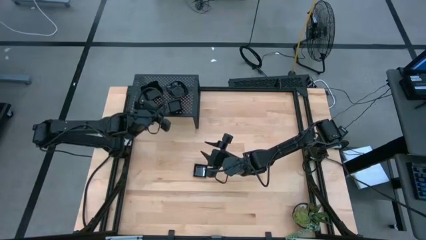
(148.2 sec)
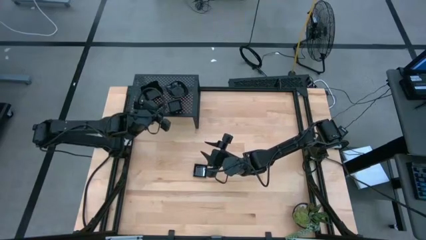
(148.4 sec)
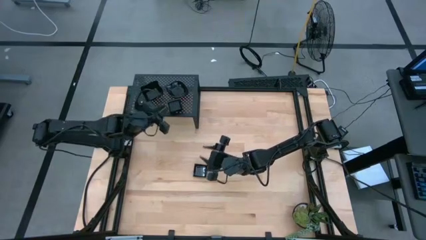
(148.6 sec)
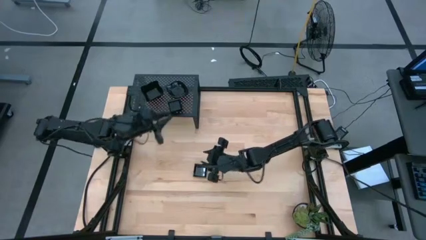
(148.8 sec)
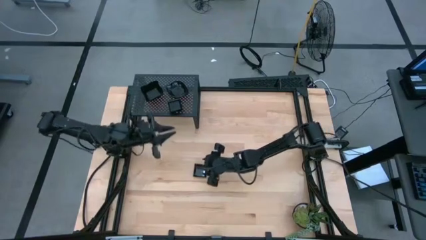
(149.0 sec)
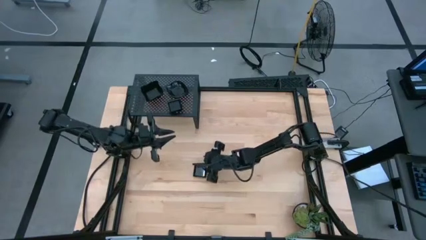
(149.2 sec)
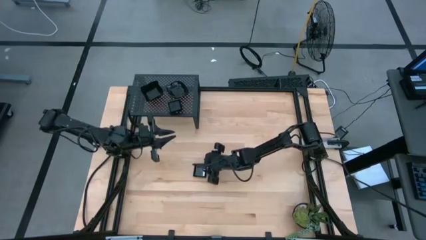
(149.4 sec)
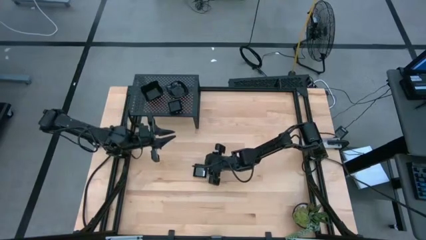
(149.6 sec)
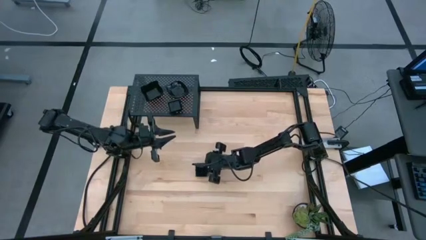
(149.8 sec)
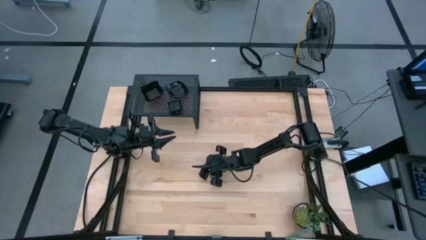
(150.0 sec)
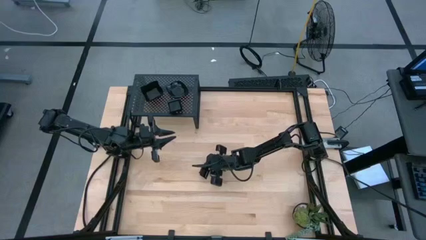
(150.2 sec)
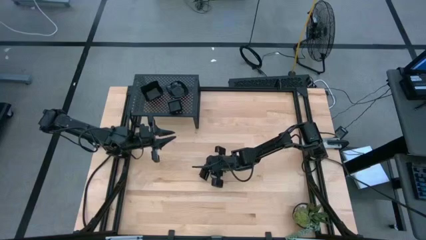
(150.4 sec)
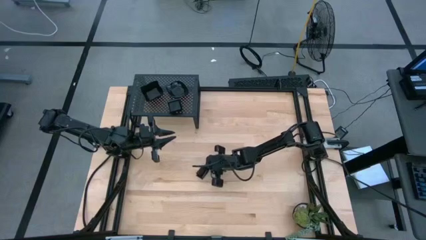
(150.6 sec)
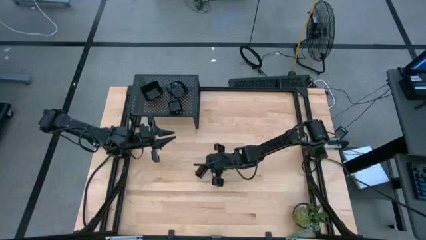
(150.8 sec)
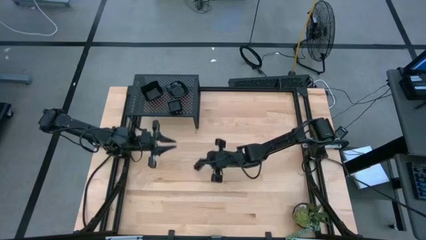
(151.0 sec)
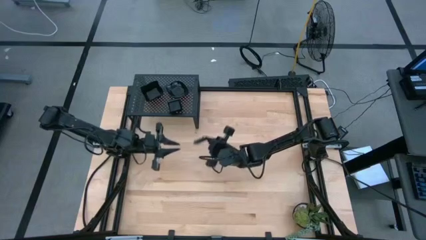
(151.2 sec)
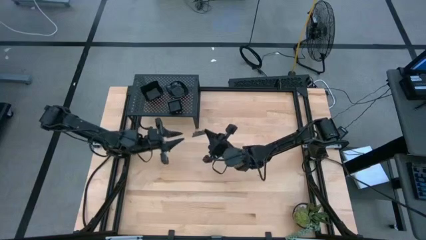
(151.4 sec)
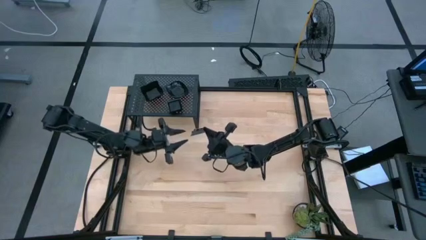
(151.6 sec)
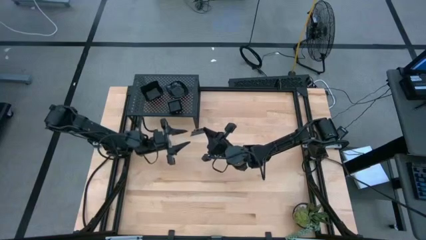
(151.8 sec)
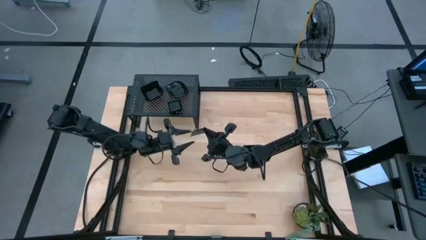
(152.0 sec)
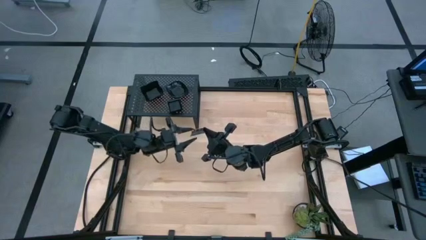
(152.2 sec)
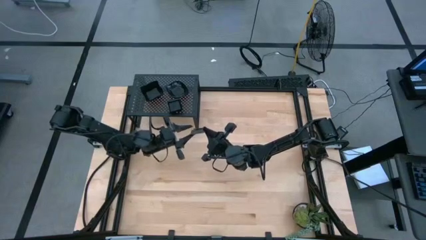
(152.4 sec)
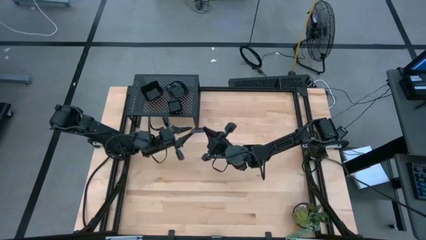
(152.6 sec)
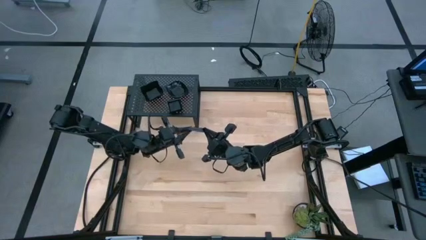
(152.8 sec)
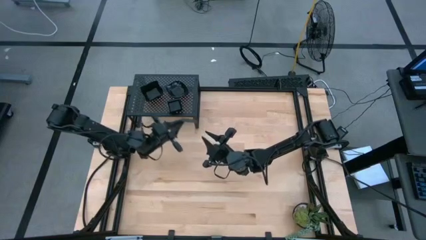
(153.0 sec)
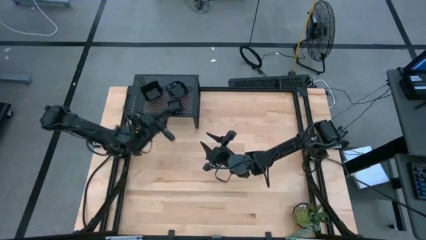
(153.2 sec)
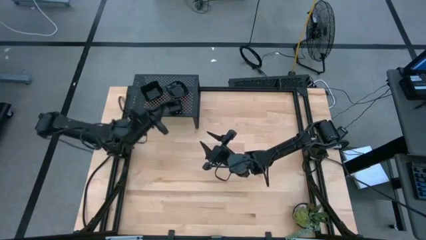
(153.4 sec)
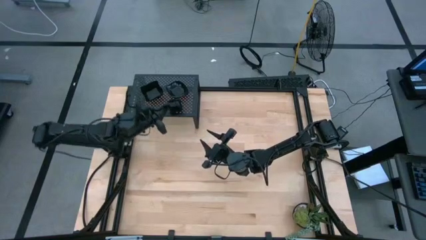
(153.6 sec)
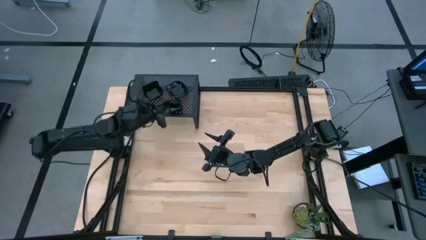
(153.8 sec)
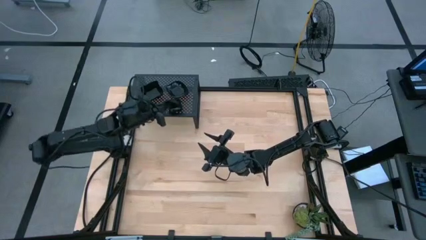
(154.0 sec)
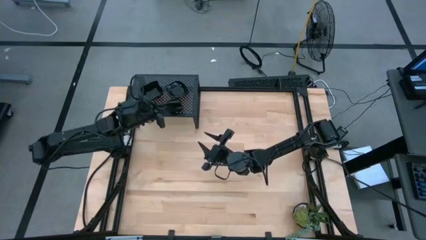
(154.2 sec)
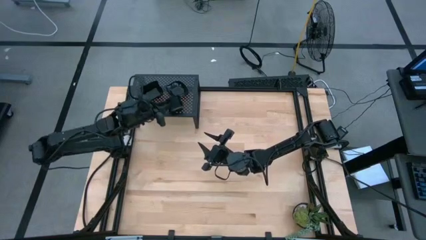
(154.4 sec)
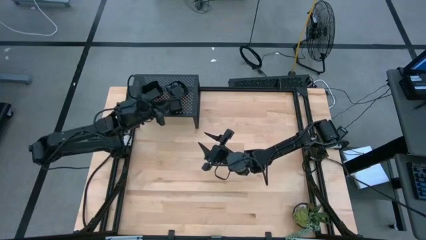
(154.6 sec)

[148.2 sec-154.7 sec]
Task: Pick & Place Mini shaped plates
Stack the square plate on top of the square plate on the shelf

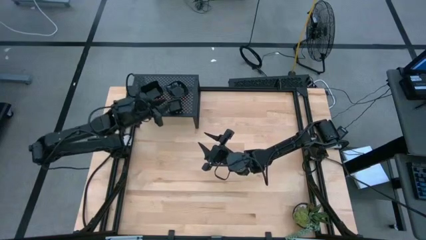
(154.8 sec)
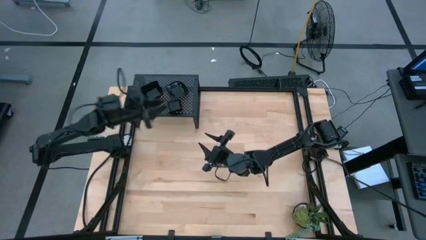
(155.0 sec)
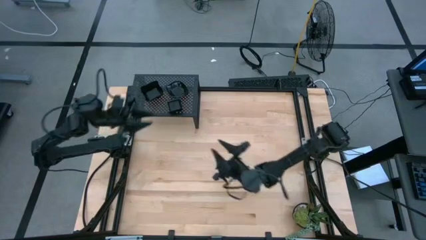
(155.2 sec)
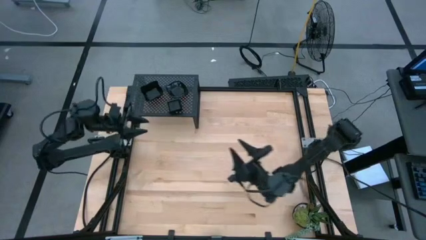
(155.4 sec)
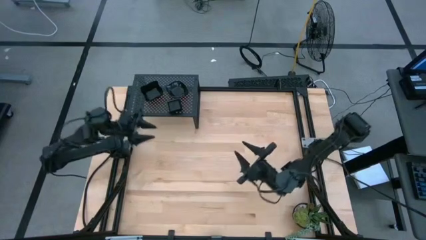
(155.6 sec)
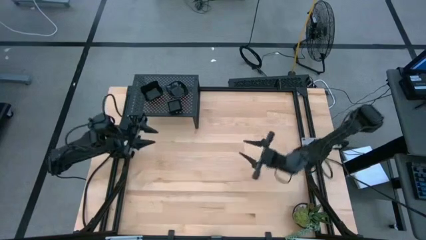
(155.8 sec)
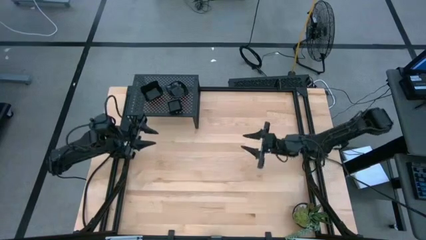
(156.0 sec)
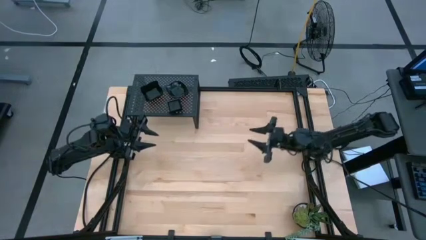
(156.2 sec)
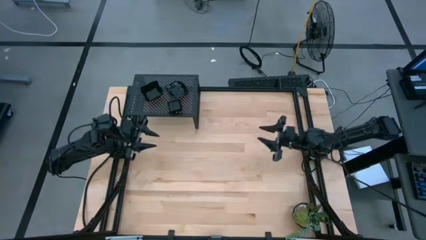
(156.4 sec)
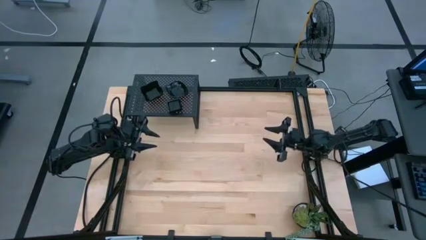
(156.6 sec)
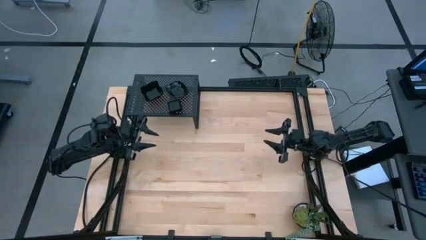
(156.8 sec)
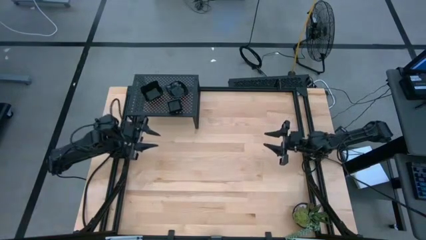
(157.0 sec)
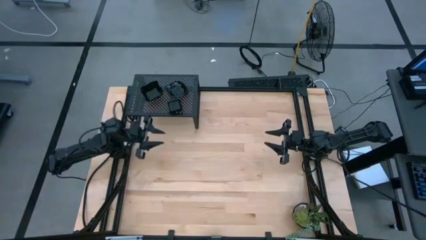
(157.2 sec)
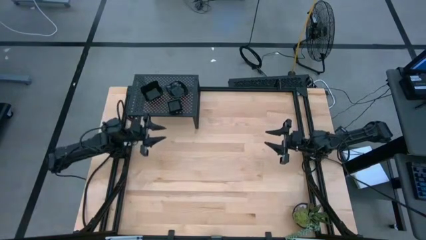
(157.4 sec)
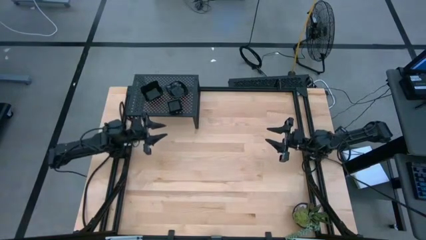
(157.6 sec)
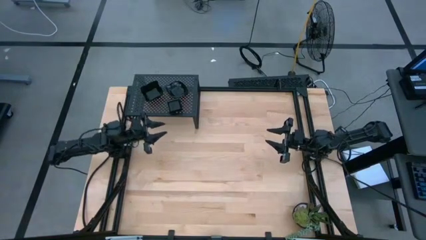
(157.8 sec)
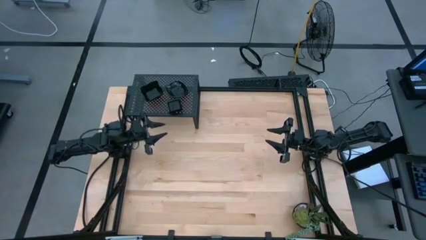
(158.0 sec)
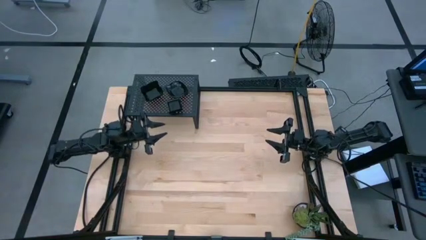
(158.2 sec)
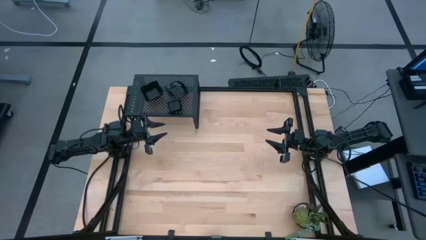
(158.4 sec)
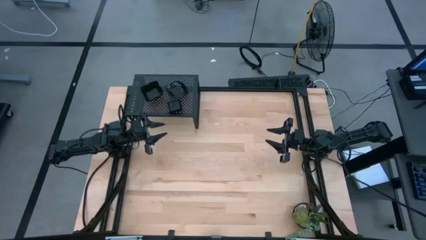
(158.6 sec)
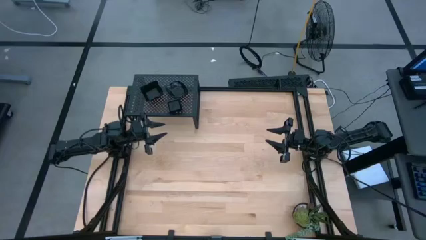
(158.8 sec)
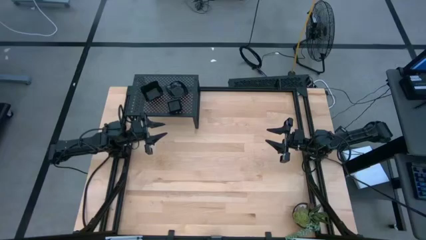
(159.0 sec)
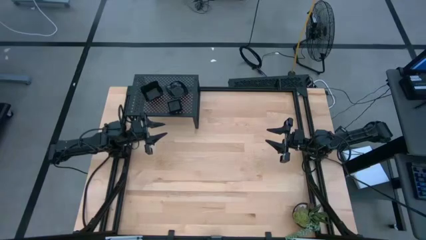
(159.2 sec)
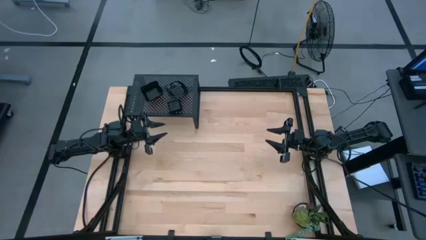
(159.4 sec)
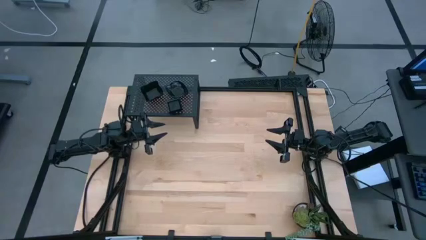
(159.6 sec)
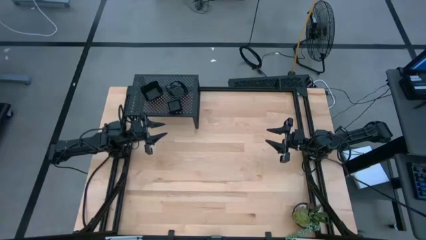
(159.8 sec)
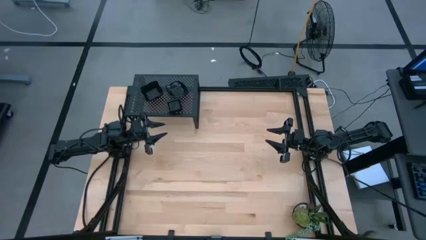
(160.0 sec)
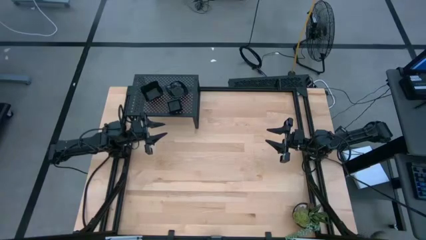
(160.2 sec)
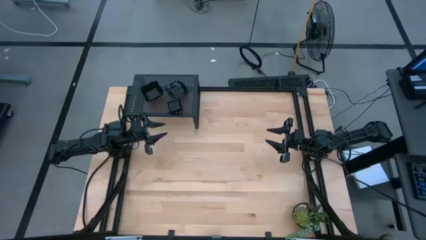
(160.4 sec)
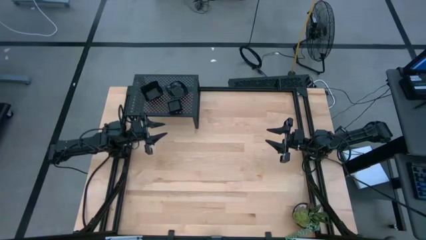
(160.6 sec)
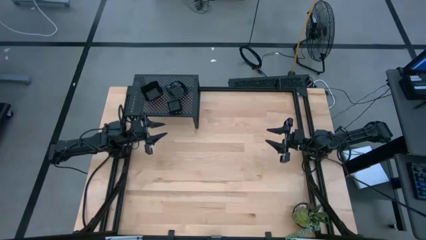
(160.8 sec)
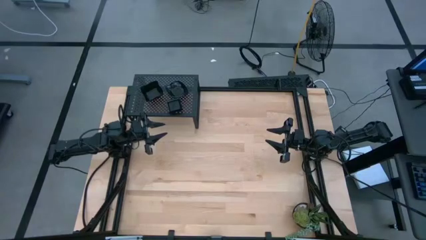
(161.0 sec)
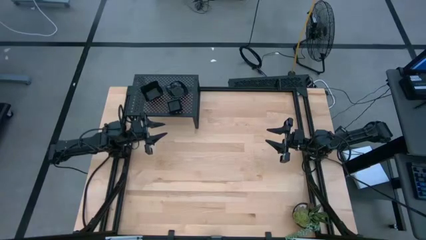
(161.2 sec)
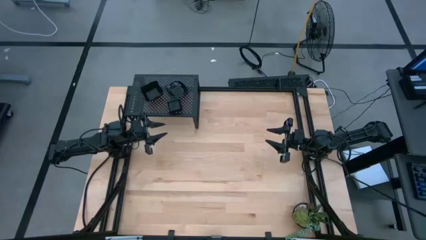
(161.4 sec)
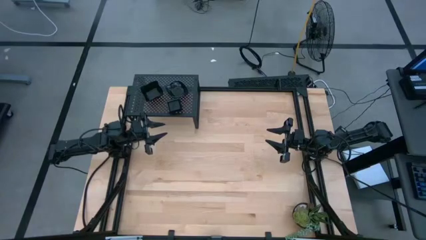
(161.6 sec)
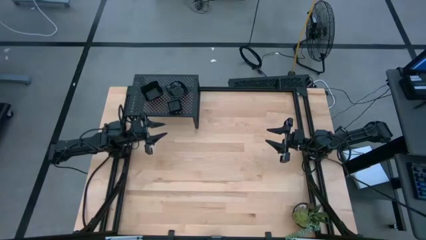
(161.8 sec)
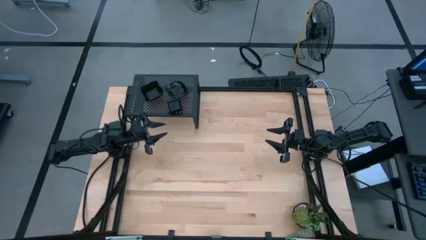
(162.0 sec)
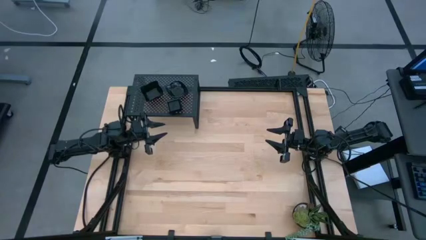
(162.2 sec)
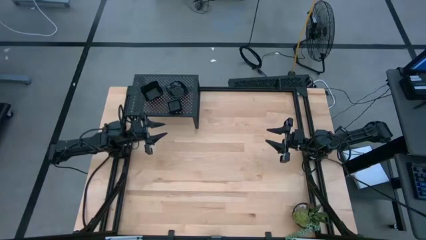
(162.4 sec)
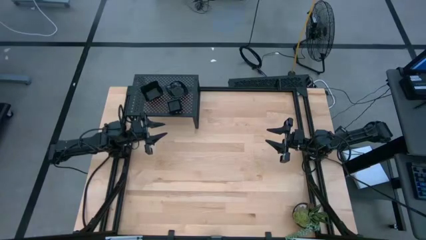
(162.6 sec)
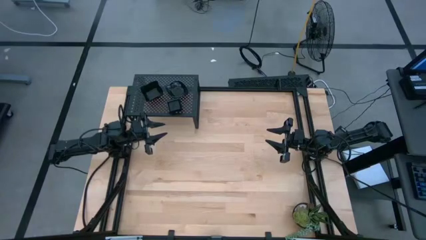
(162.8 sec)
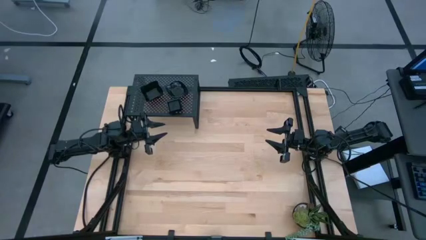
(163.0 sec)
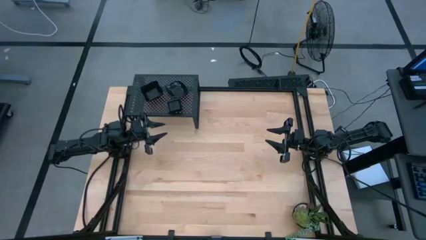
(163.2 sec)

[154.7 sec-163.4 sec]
Return to Home Position
